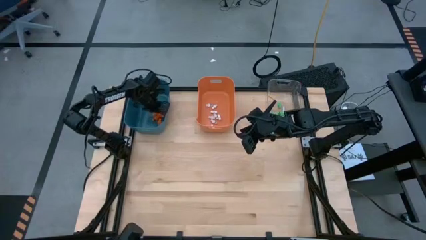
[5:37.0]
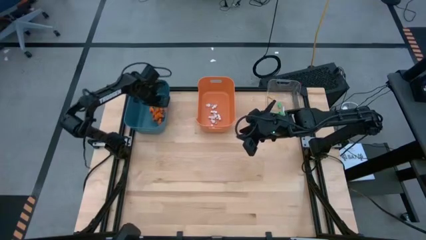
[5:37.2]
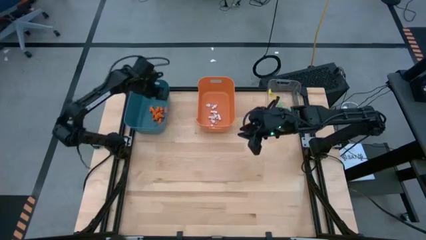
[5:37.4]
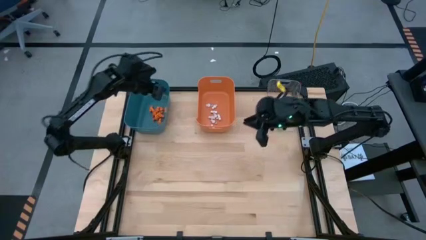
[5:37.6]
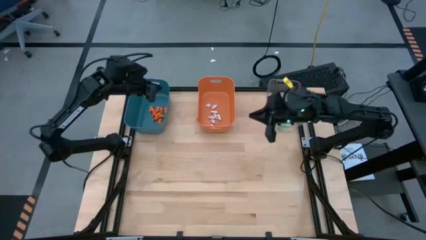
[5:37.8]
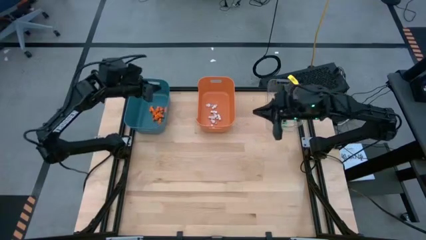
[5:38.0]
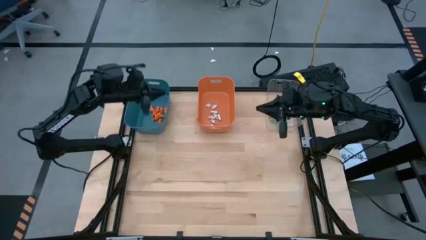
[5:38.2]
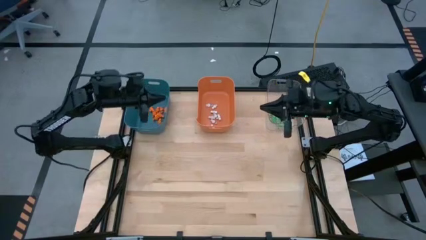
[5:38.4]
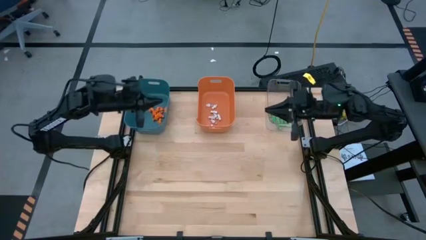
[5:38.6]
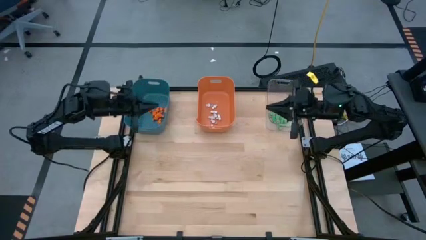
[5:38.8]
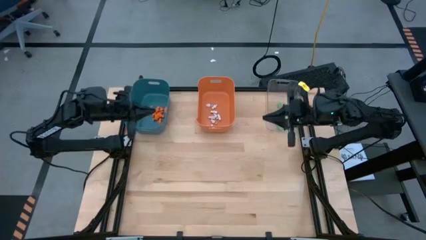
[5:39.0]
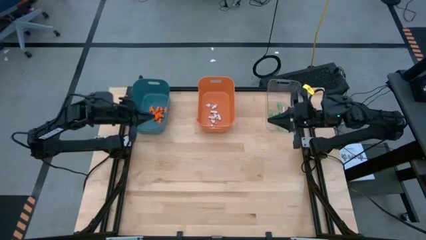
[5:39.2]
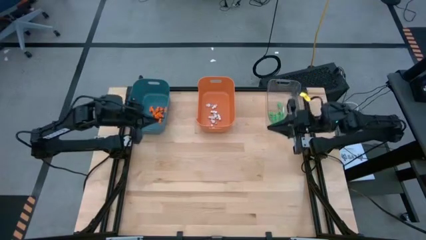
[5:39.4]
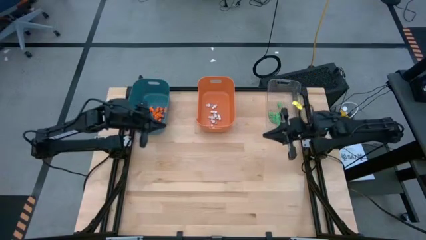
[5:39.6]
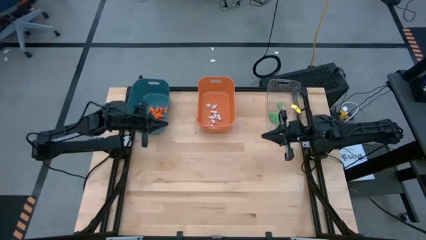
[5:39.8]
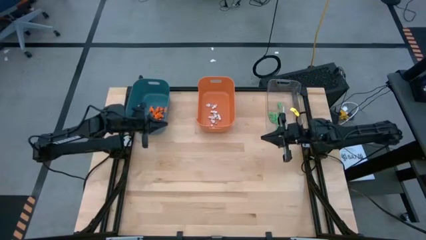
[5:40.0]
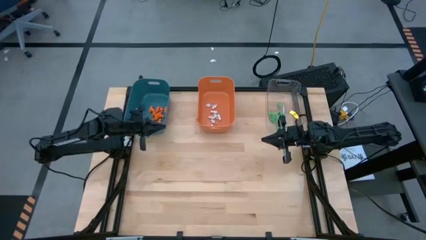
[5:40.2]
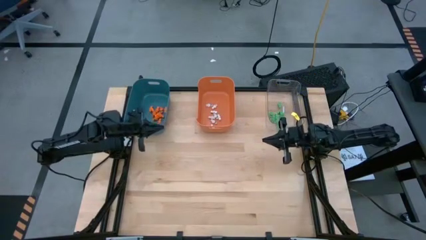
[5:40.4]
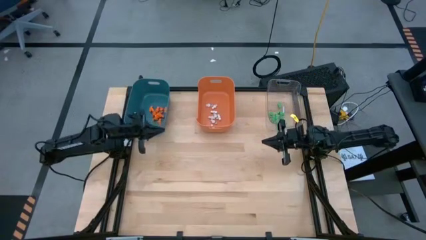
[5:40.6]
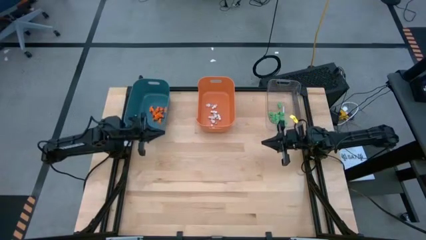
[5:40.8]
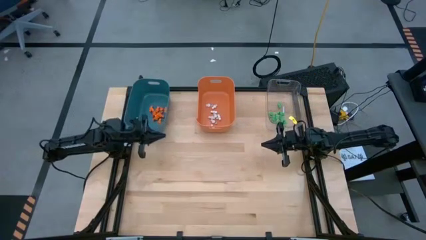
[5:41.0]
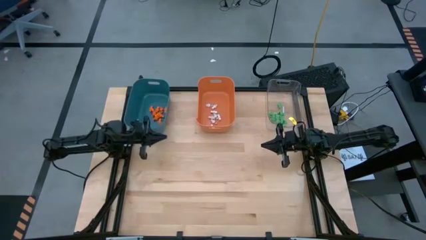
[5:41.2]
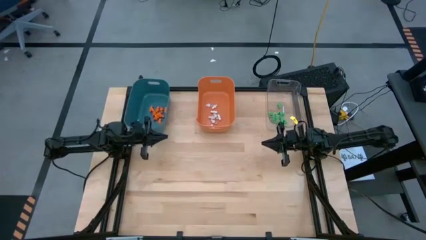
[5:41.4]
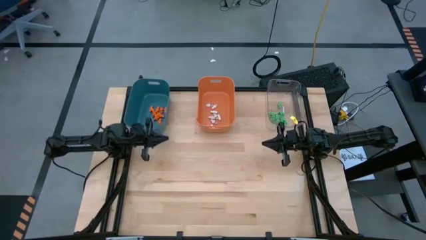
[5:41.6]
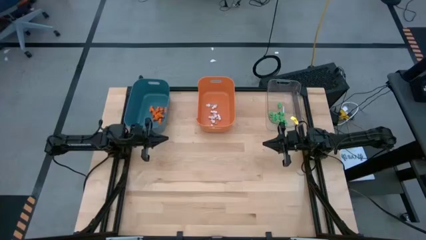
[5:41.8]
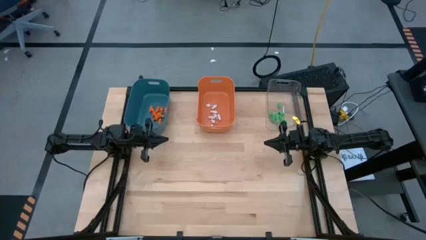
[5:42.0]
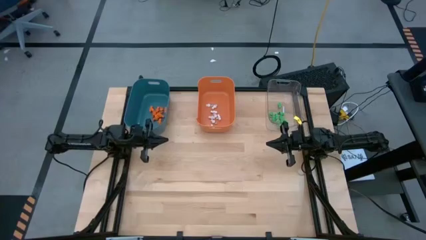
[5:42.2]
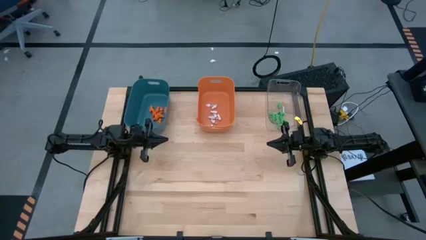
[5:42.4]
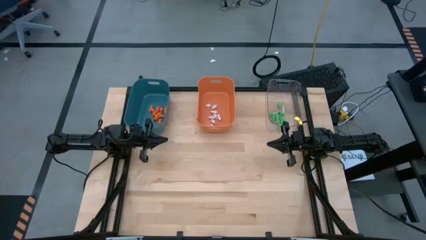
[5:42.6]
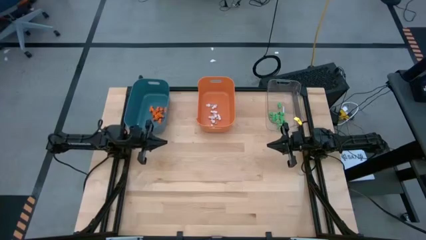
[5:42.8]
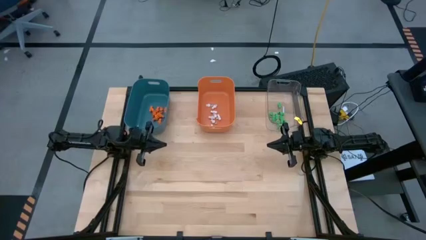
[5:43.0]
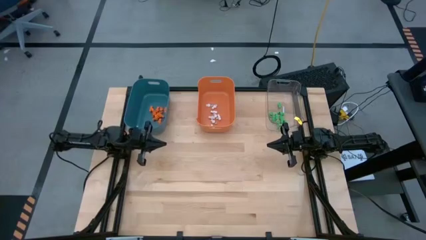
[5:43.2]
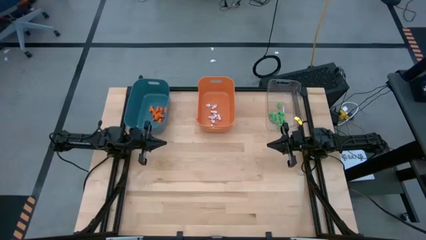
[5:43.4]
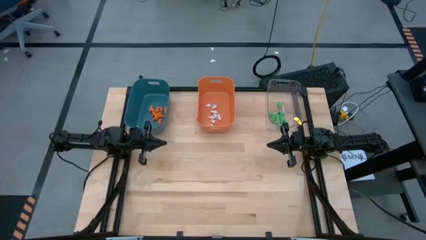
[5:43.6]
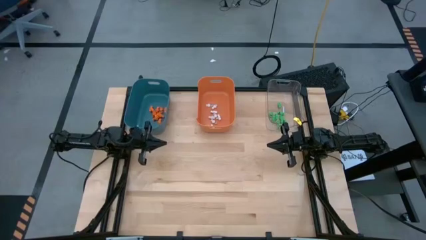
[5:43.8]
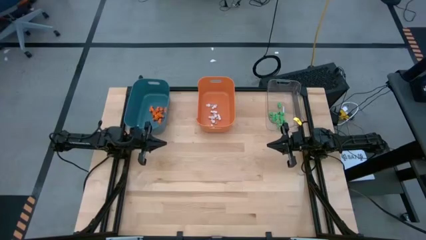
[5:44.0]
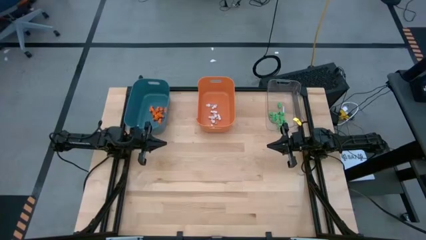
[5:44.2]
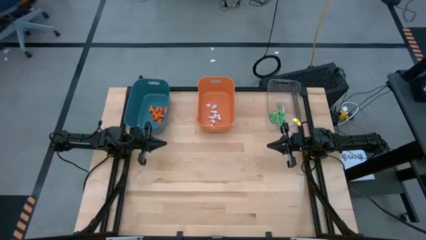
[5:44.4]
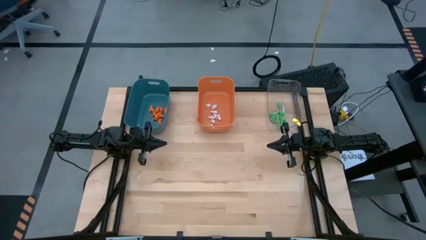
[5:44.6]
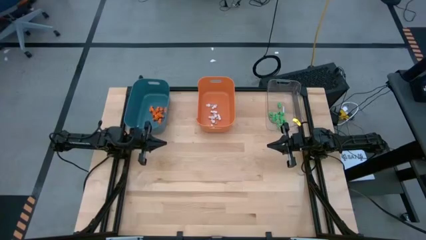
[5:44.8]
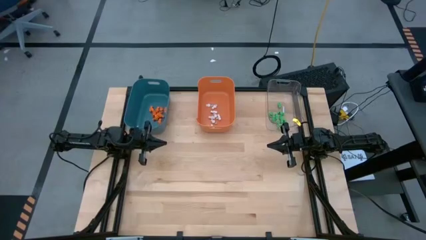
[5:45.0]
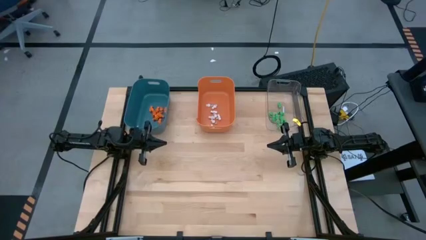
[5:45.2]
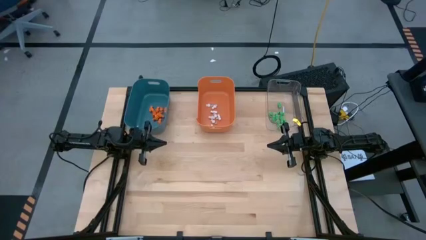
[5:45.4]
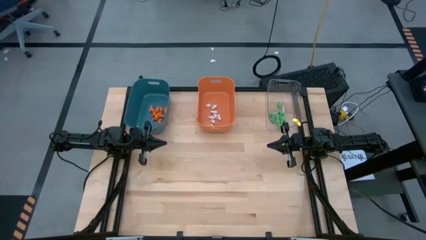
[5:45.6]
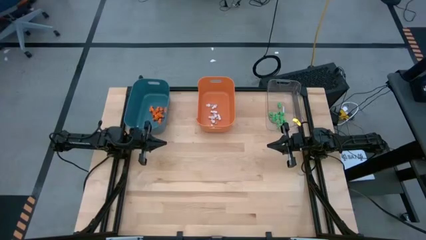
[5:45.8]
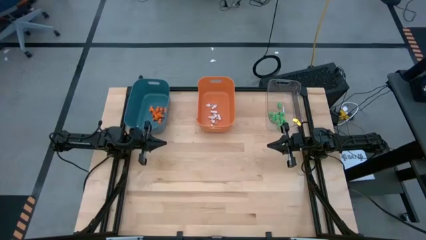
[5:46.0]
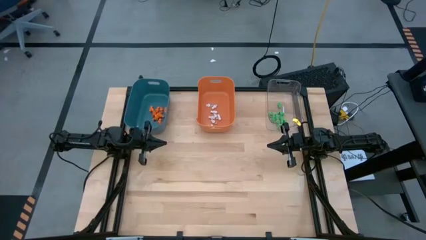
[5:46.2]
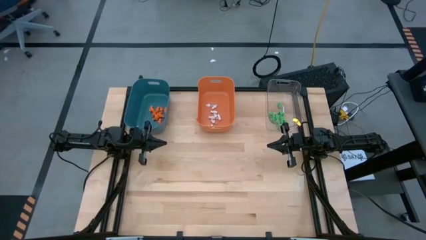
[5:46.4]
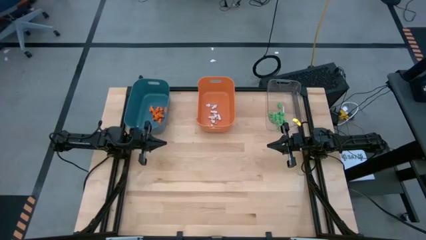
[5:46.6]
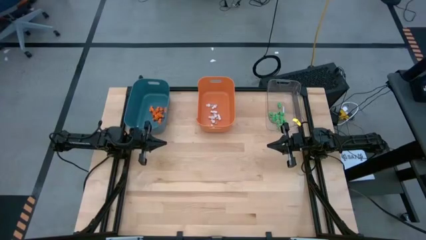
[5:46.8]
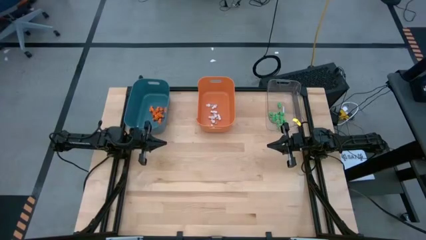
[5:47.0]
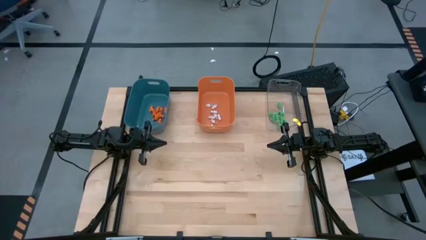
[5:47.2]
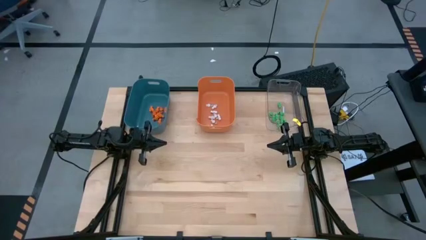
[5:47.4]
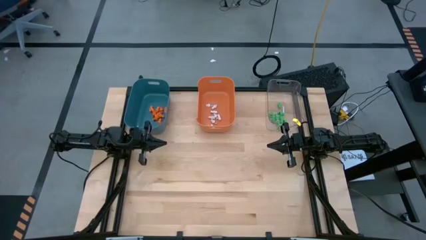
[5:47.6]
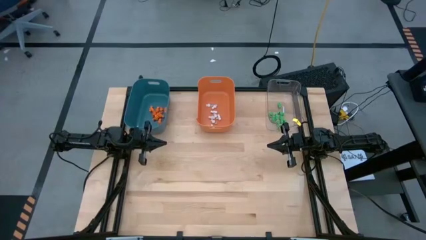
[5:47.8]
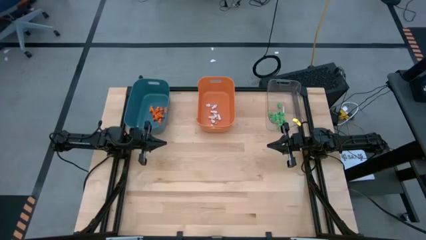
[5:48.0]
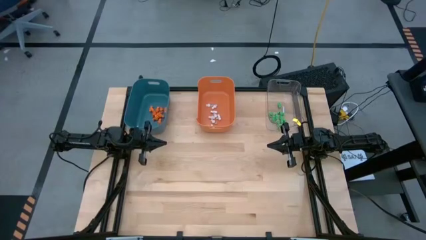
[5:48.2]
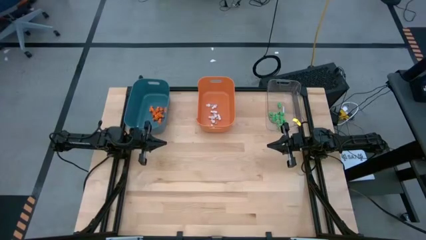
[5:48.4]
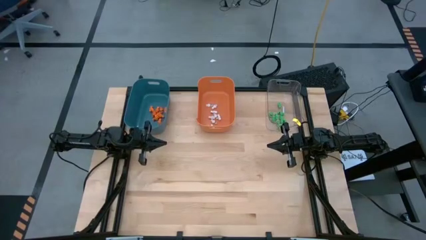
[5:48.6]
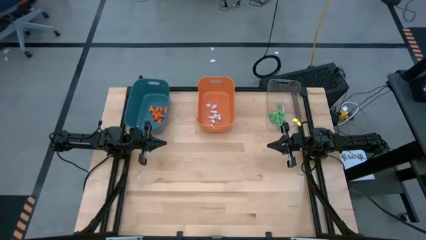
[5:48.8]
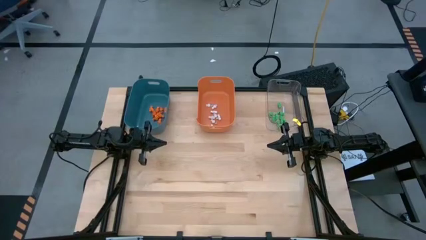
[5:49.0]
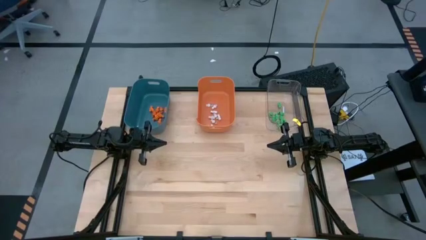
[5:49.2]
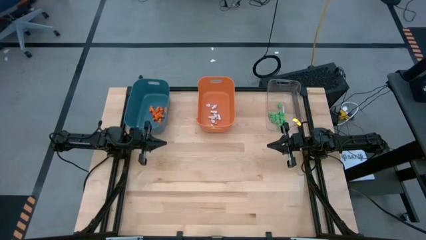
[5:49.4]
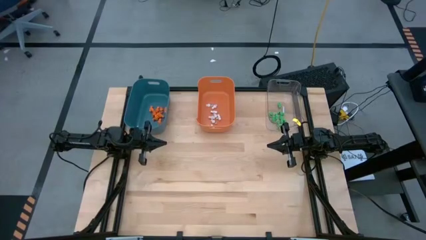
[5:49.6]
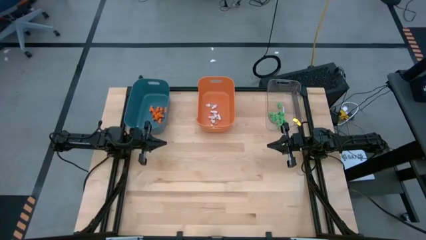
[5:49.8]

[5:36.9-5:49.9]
Task: Sort Halloween decoration
Return to Home Position
